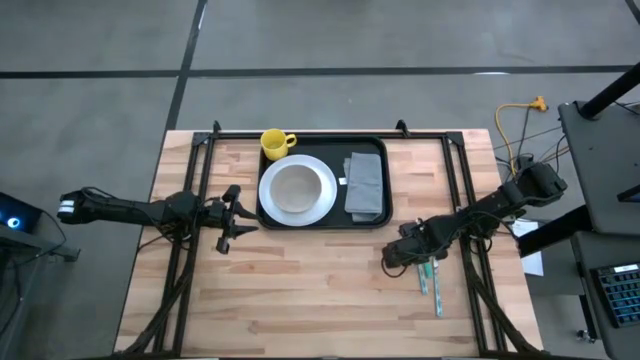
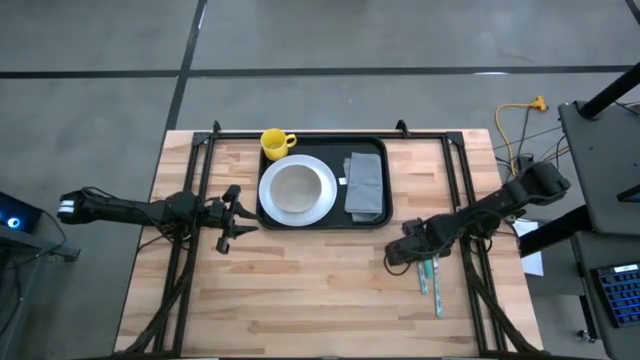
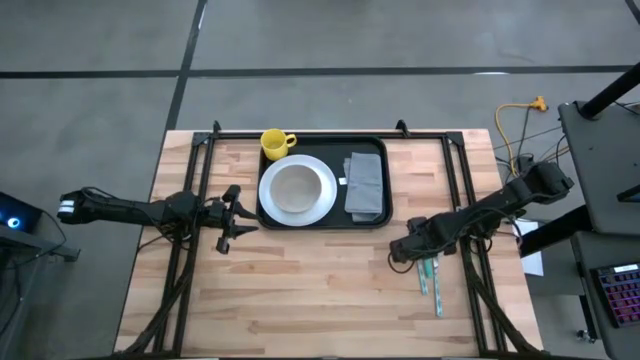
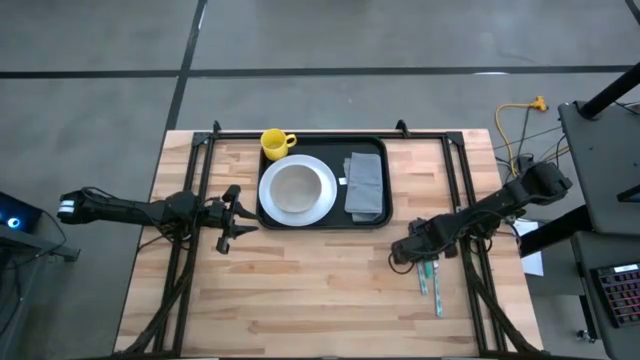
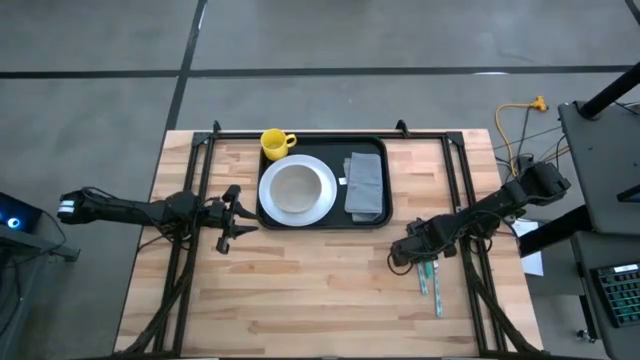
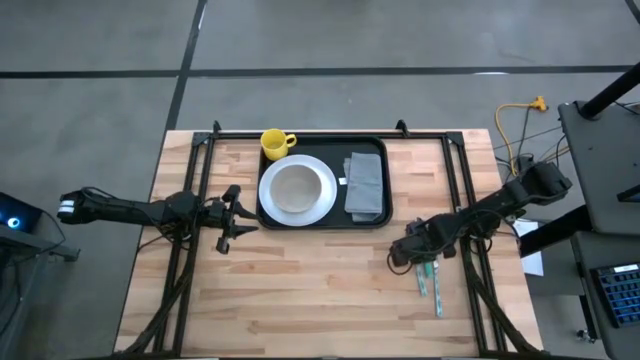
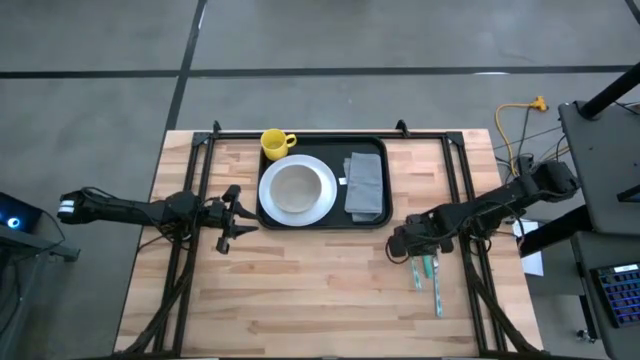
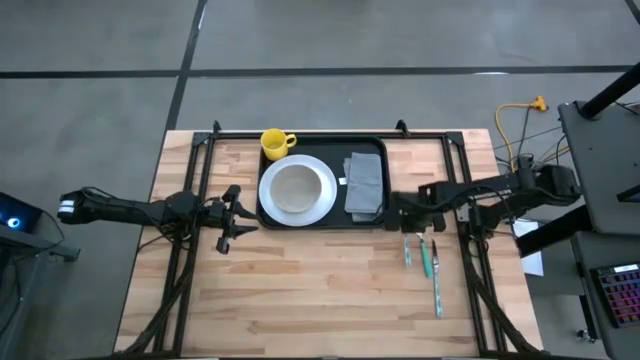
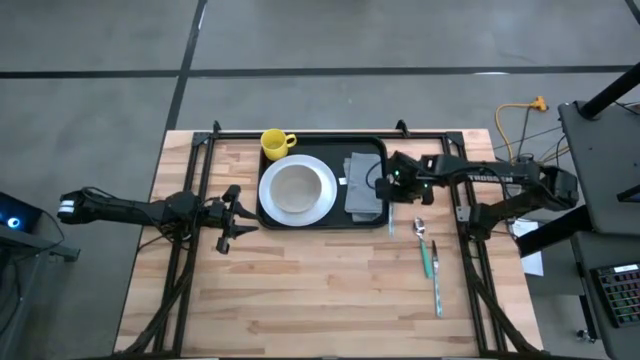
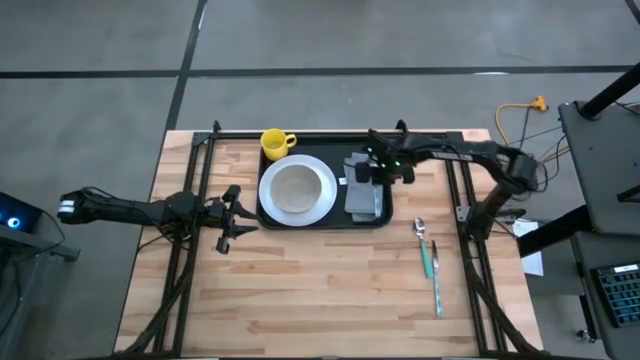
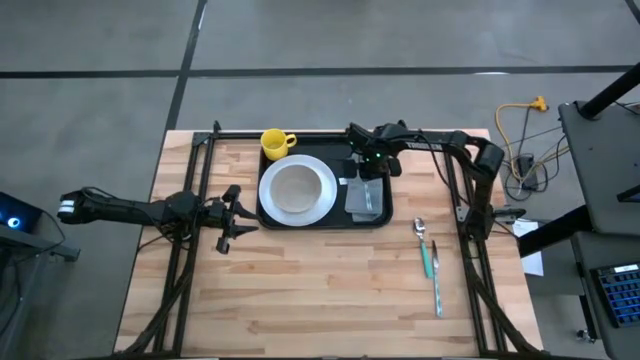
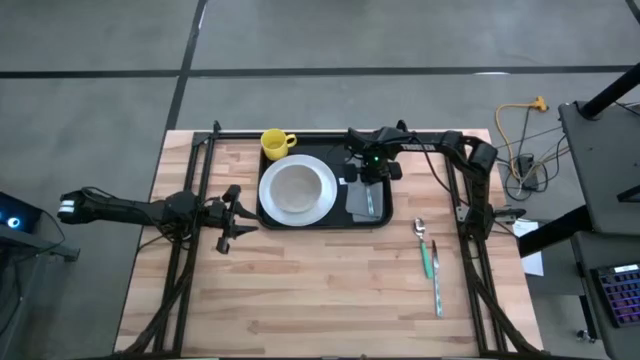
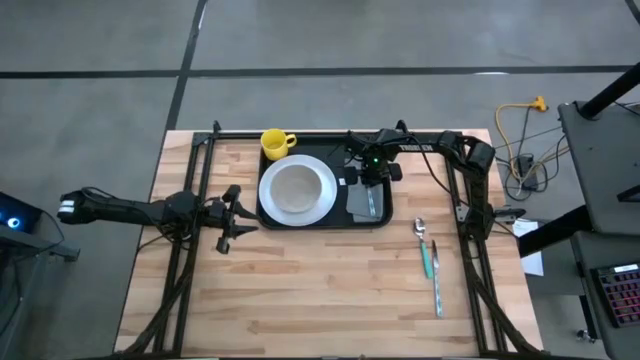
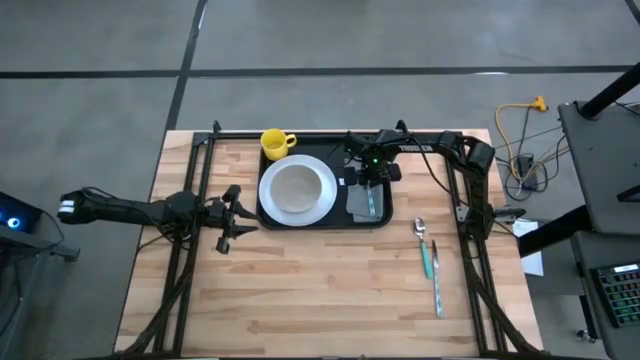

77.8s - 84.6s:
Task: Set up tray
Put the fork on the gray napkin

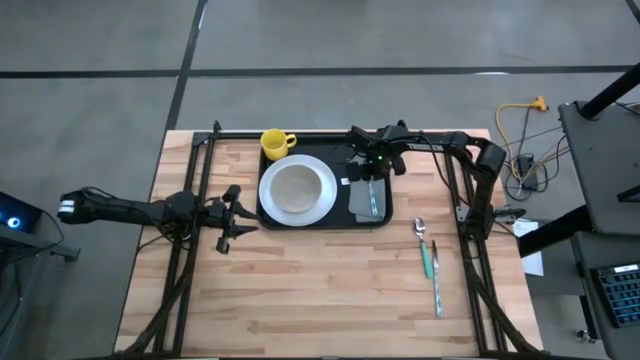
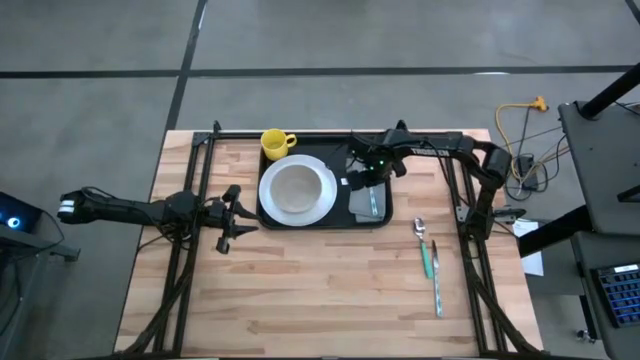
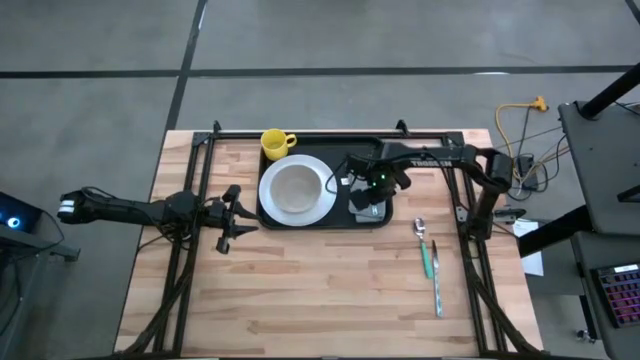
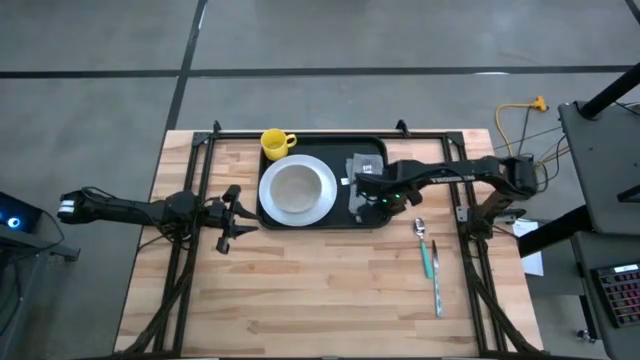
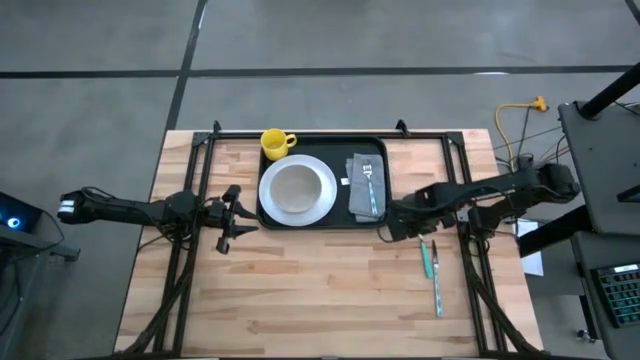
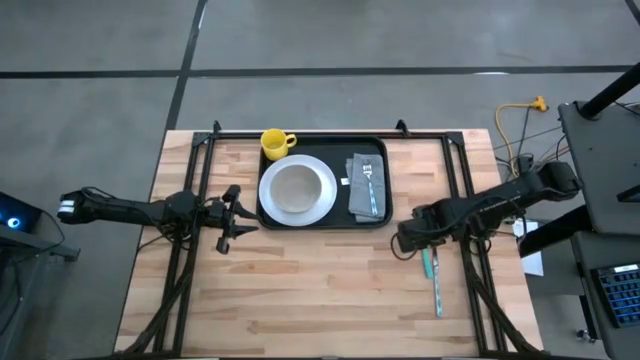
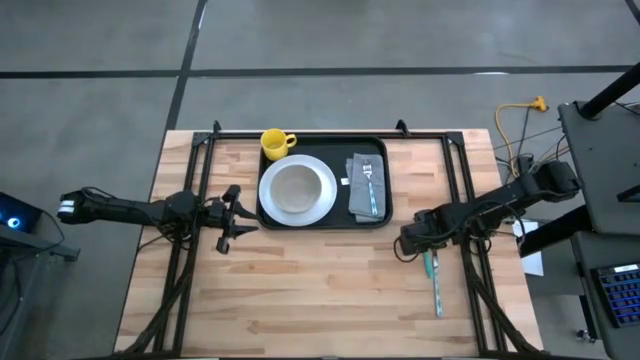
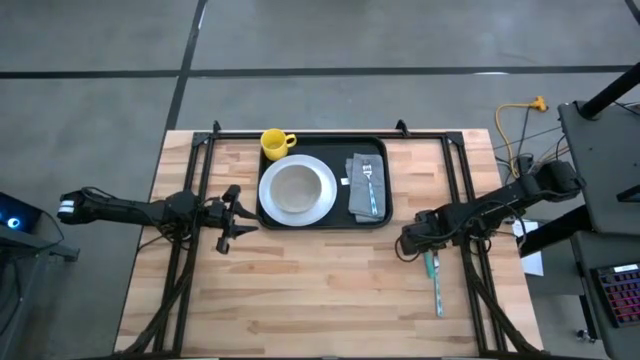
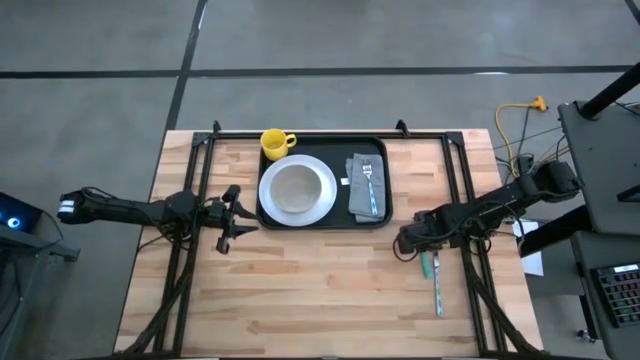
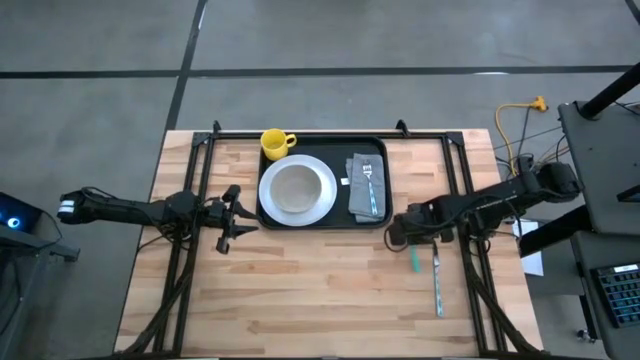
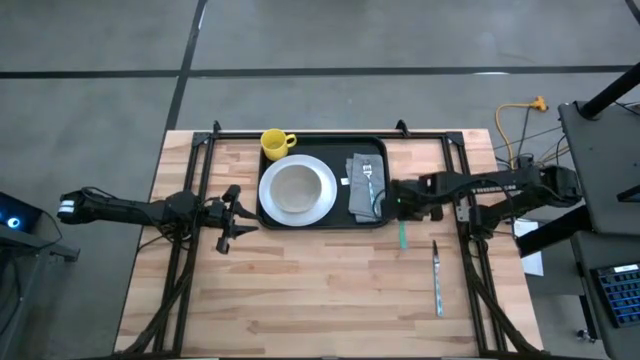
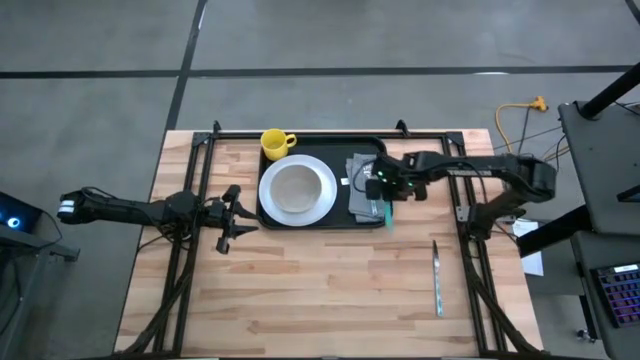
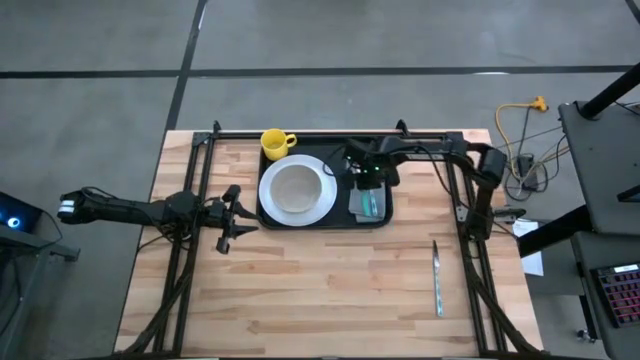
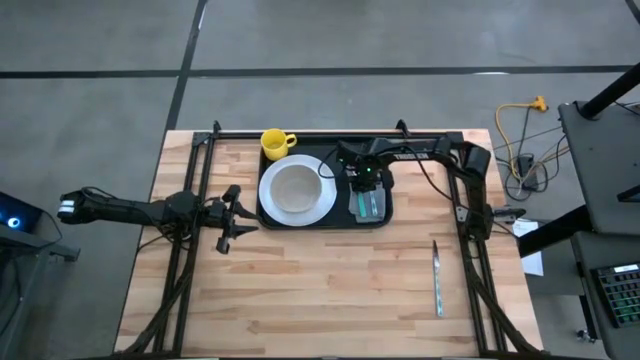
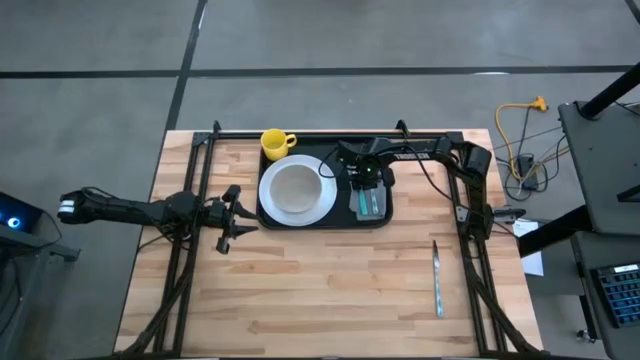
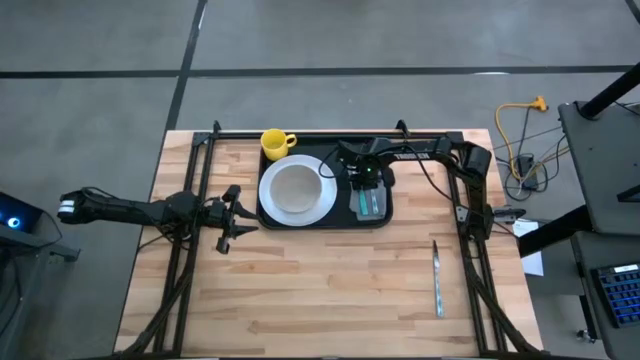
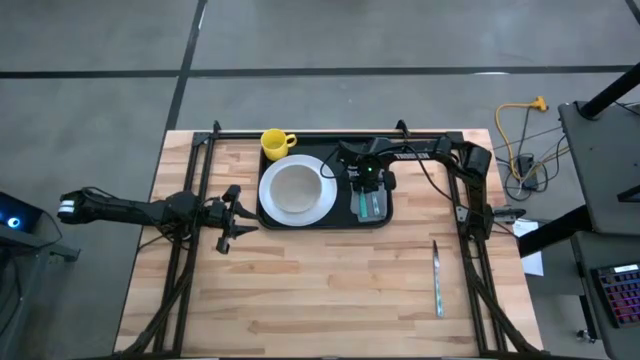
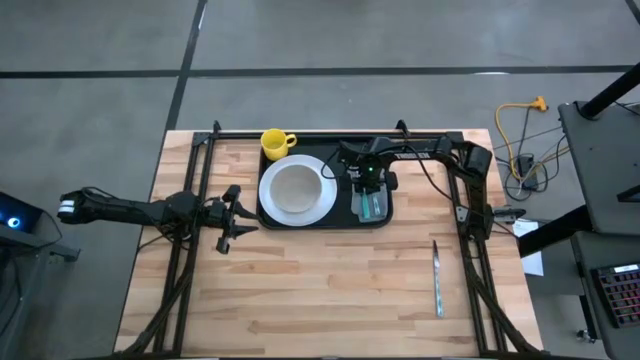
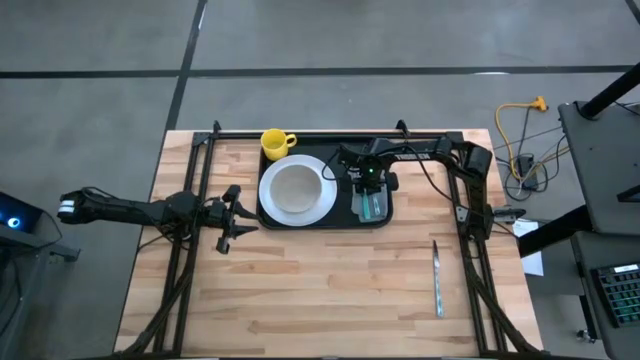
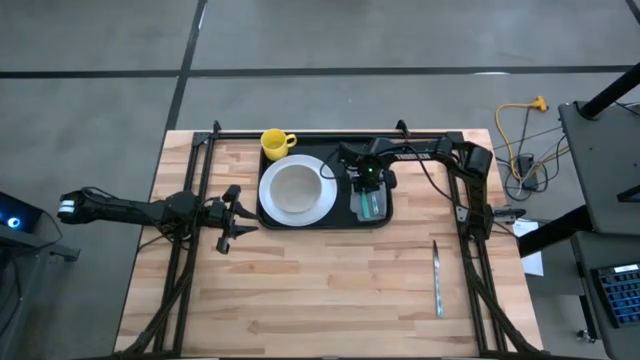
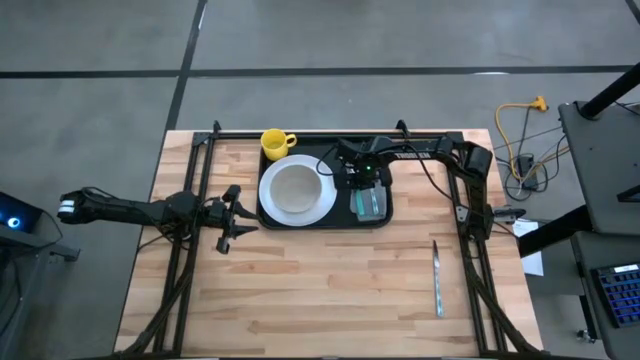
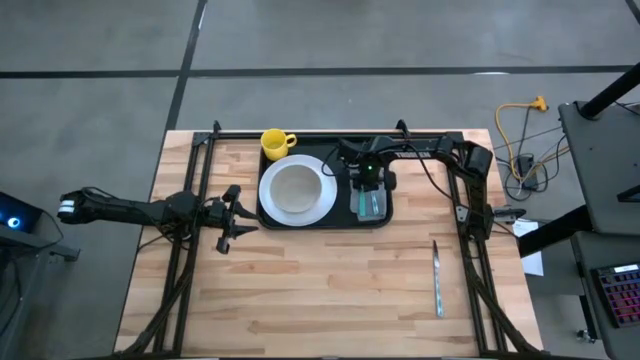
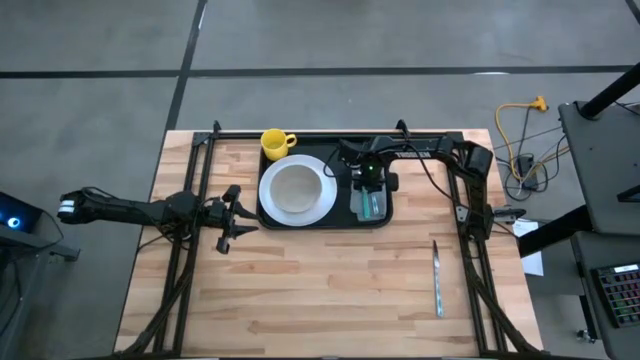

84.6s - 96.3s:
Put the blue spoon on the gray napkin

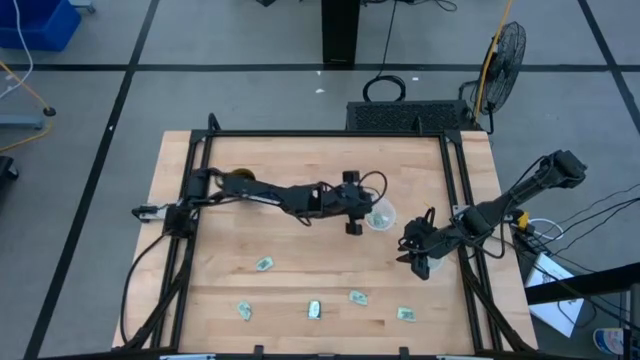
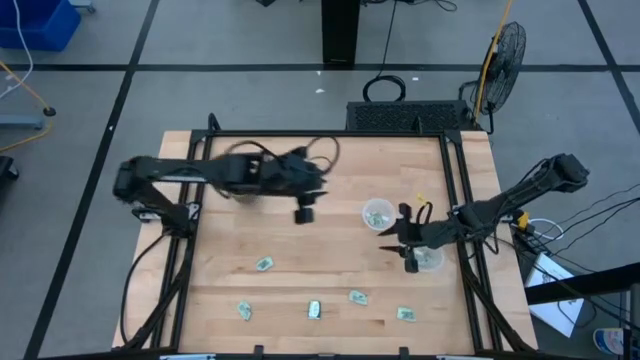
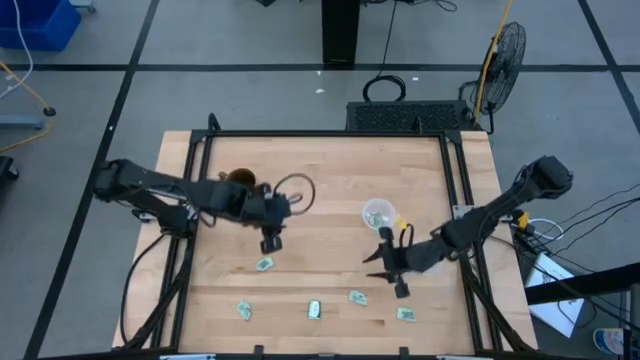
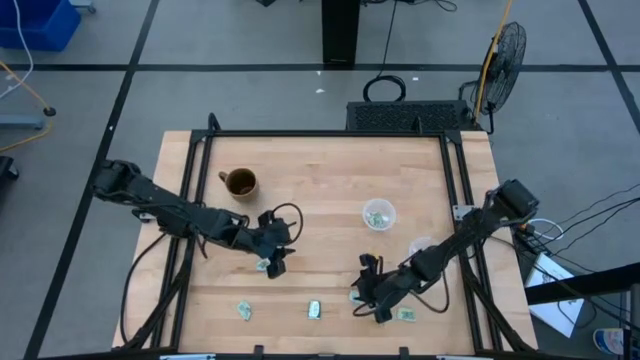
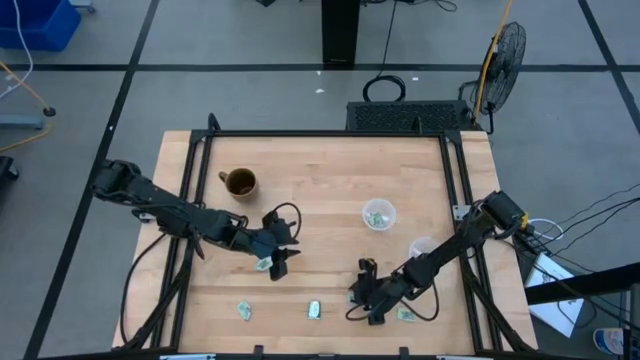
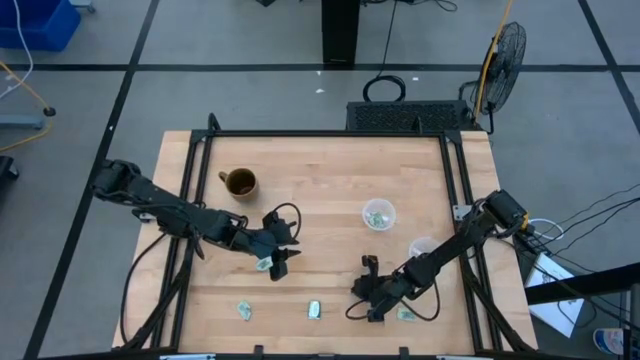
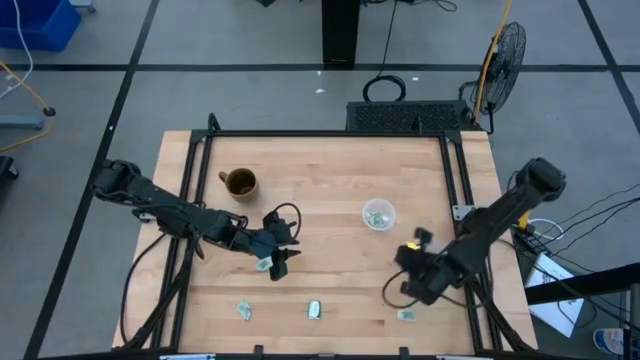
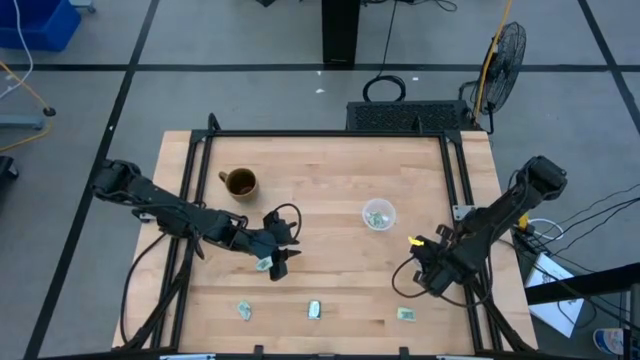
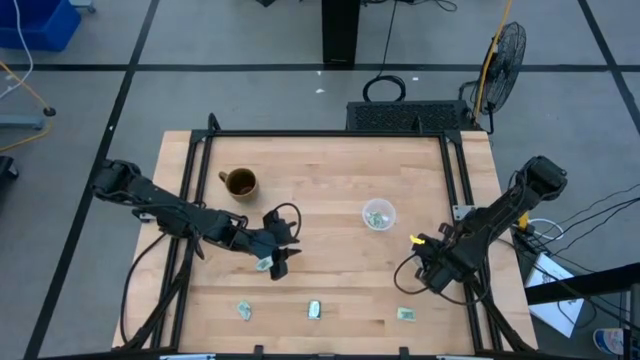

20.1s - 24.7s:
Task: Pick and place items into bin
Put the white stevia packet into the bottom transparent bin
